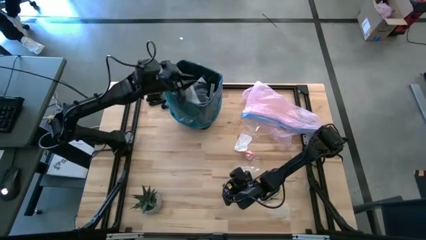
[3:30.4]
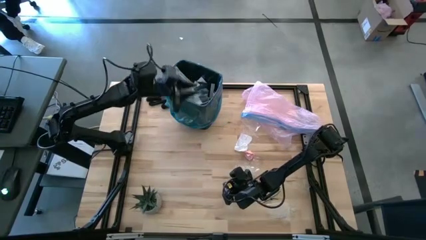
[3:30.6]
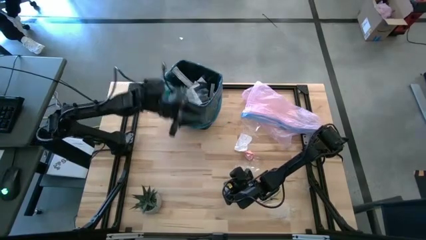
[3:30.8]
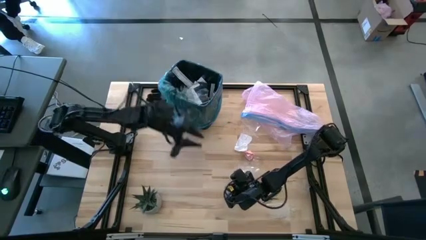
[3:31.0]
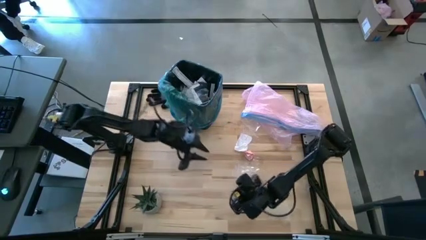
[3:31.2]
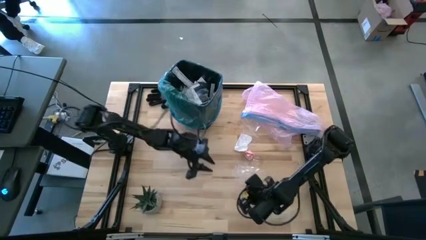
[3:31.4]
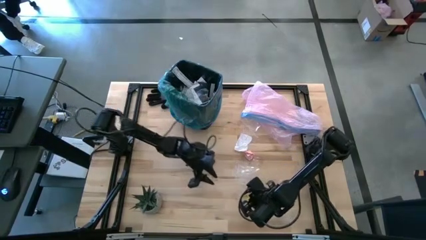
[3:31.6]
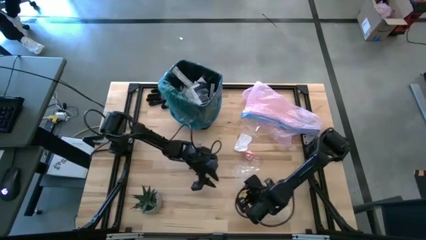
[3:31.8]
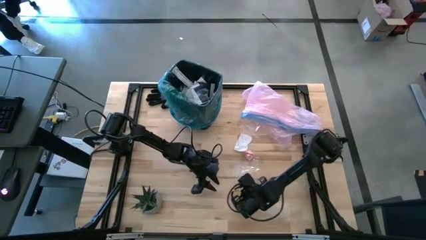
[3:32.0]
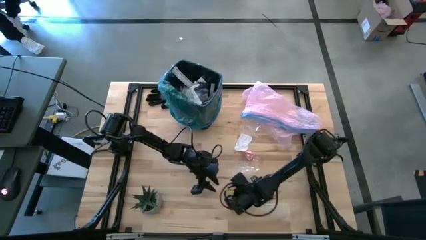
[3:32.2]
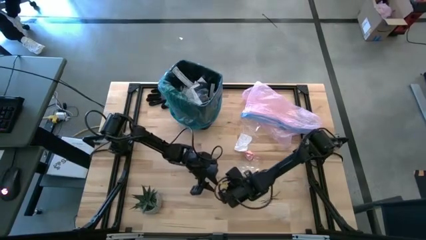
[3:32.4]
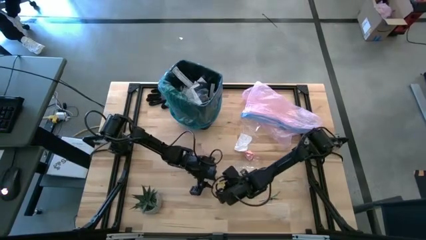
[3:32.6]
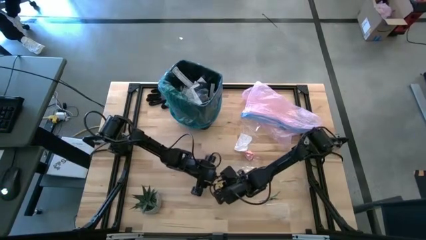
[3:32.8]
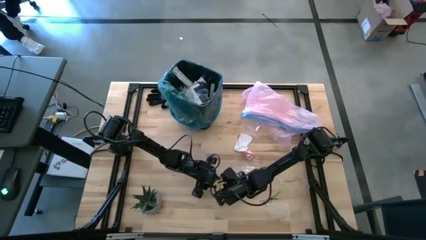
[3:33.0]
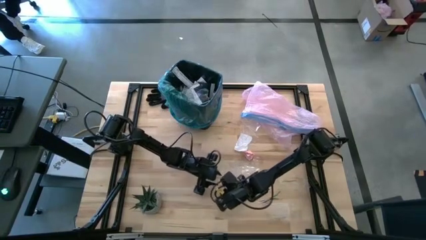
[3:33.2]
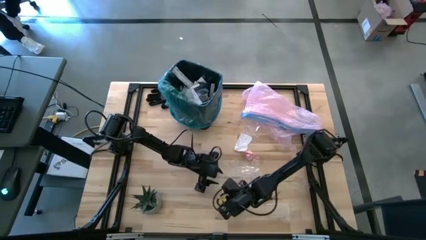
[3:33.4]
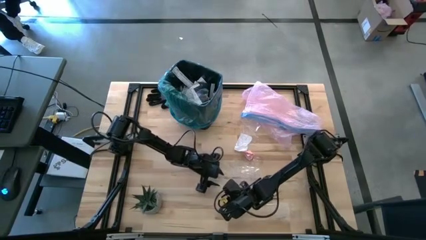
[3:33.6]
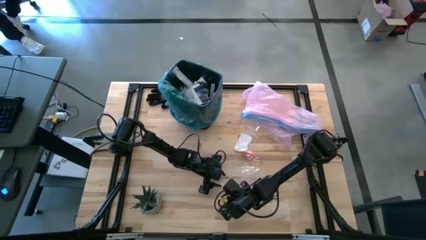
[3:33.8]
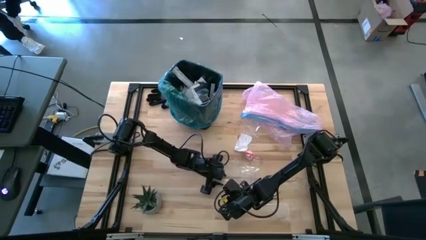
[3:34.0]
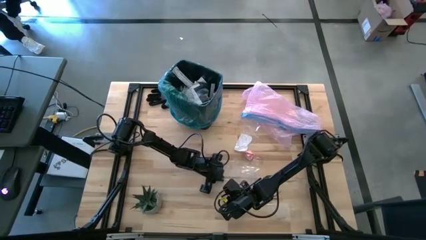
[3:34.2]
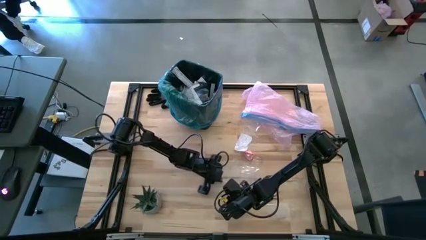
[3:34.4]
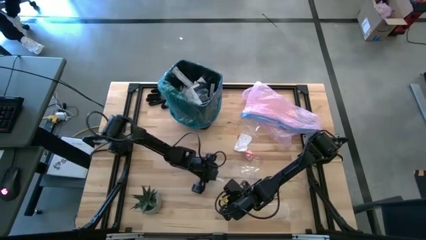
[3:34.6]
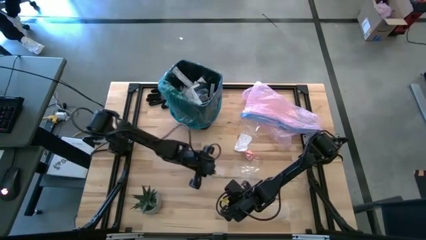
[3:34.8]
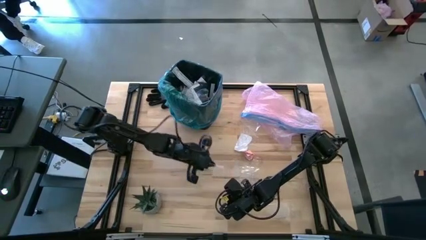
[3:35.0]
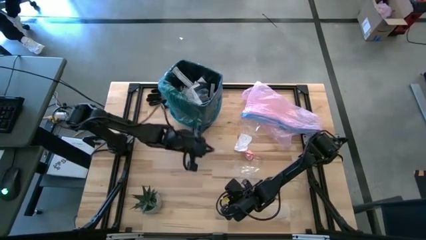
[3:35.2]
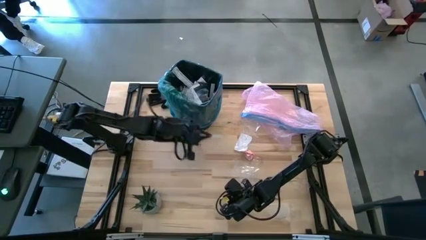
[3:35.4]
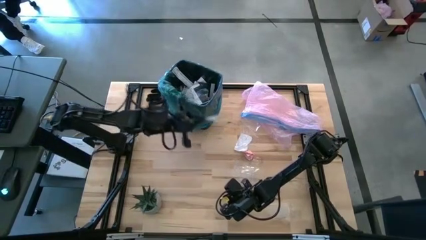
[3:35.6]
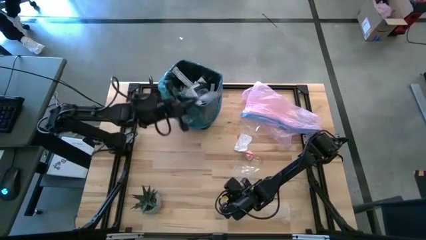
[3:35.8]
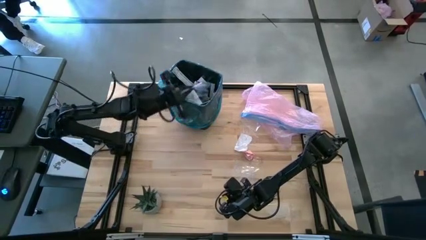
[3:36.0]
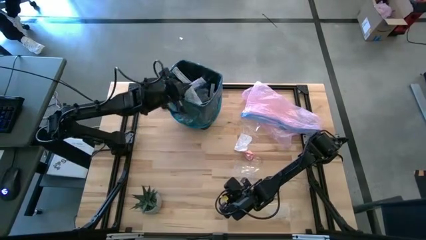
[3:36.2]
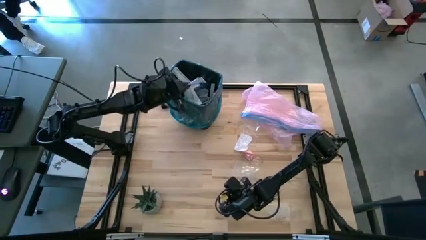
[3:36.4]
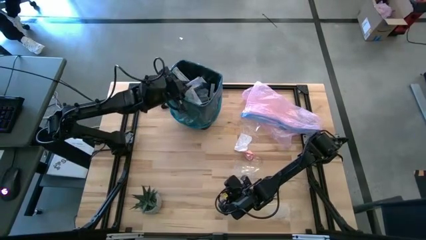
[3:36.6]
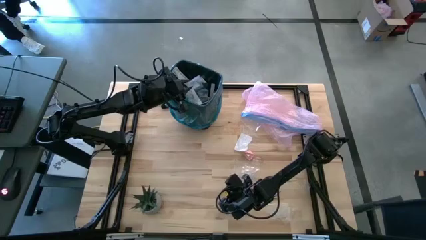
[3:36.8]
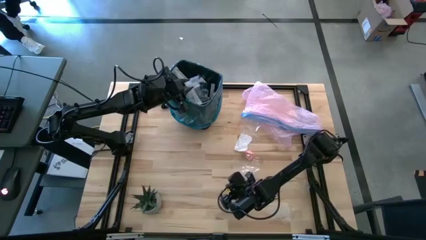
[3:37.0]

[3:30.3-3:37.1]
Task: place trash/remove bag and relplace
Put the clear plastic into the trash bin

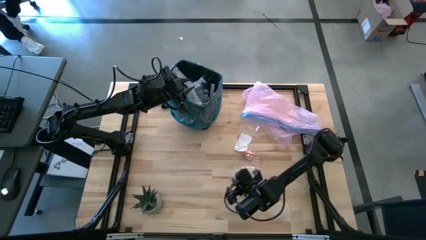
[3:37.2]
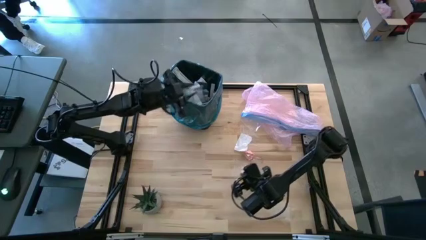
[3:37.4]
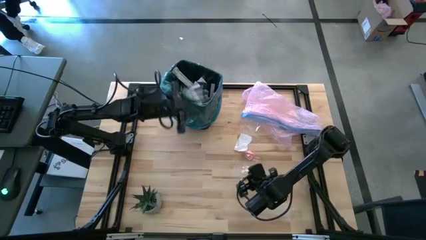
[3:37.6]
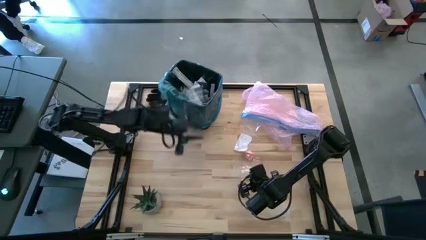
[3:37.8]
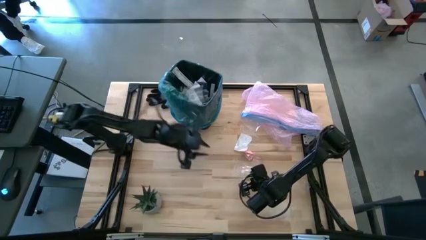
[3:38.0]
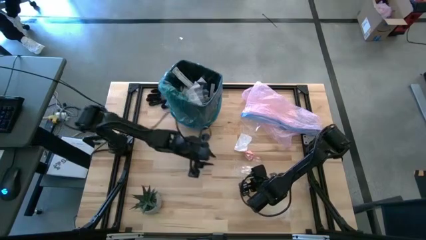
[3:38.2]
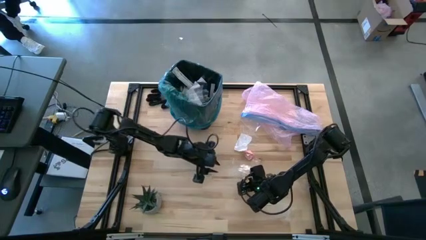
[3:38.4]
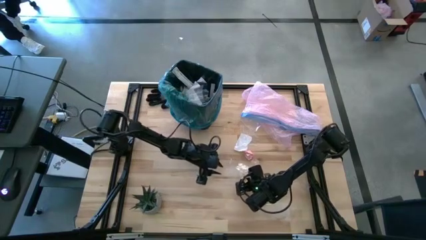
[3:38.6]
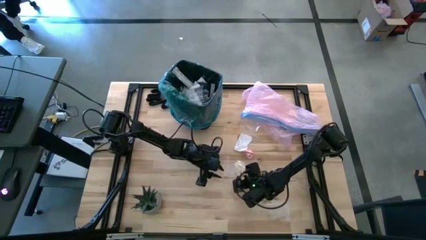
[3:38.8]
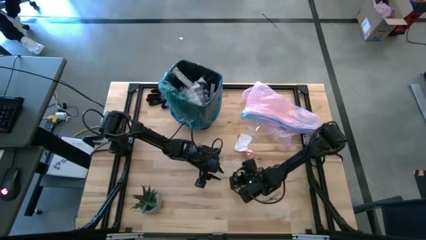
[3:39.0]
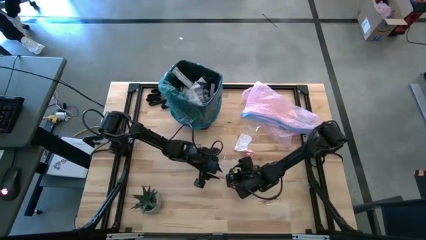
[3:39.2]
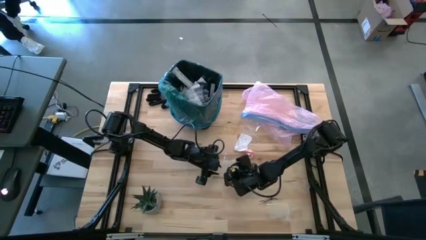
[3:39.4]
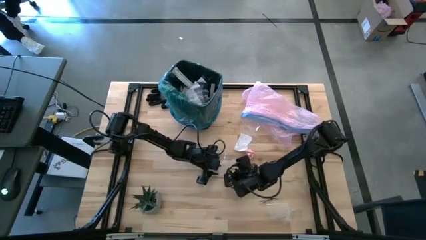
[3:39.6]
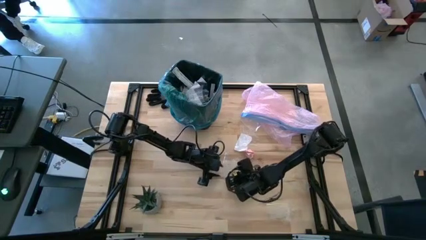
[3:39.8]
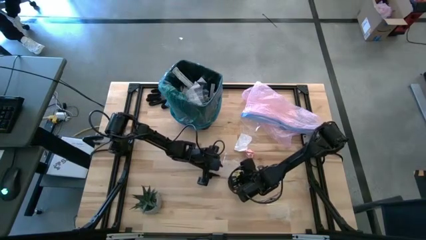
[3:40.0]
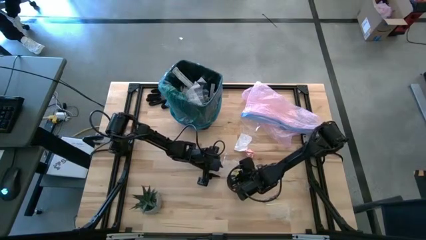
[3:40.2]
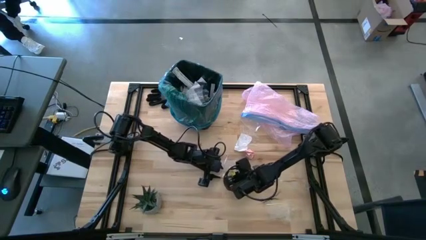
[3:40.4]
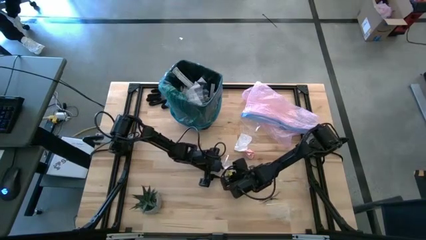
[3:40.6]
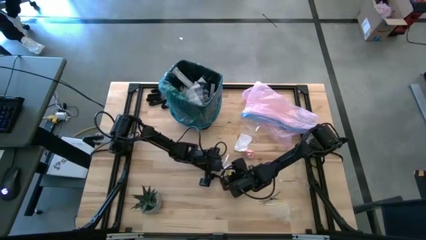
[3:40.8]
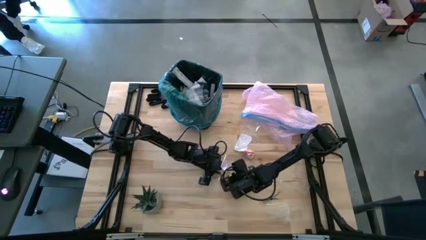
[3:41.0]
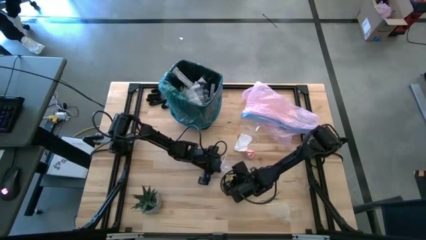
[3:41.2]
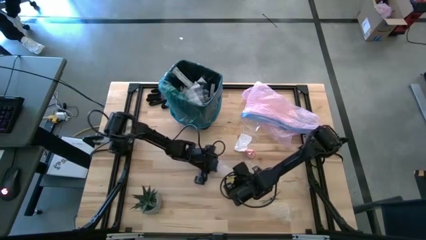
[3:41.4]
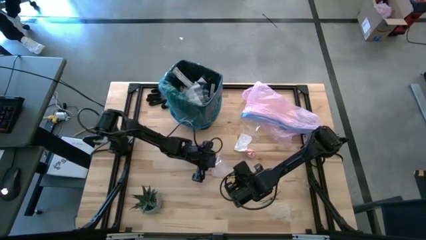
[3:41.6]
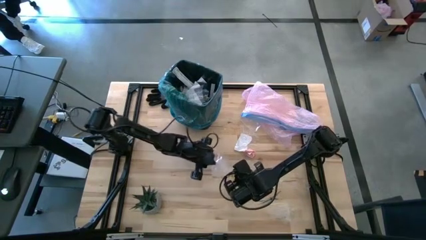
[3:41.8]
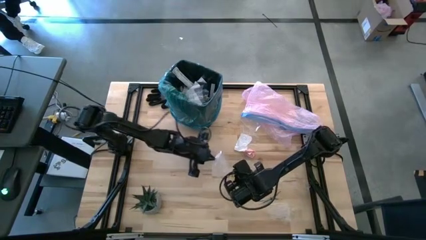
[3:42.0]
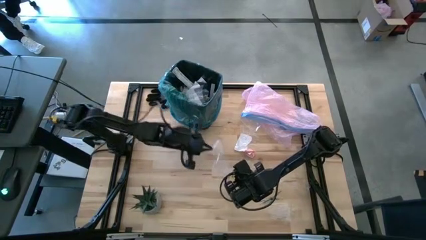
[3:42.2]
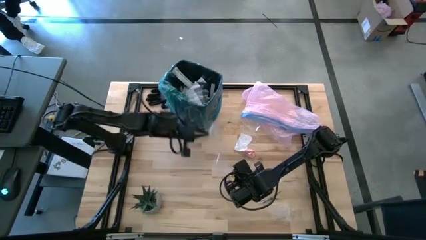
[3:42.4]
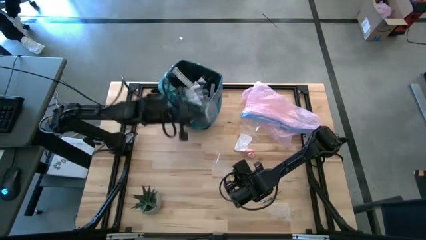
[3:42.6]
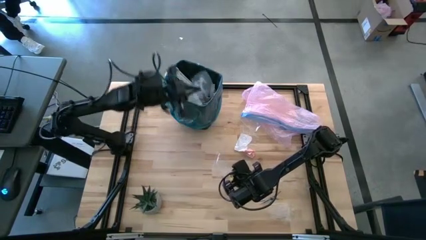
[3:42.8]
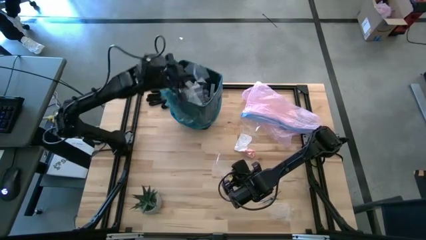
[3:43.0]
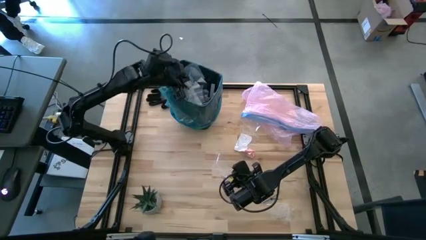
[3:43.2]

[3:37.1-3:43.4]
Put the clear plastic into the trash bin

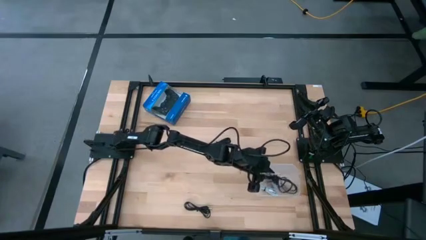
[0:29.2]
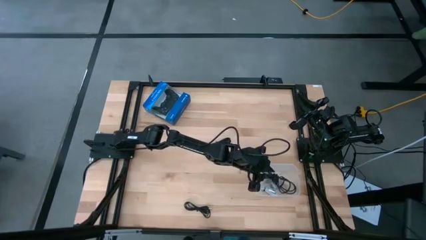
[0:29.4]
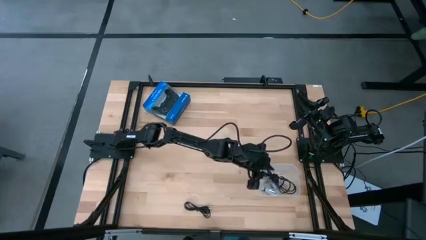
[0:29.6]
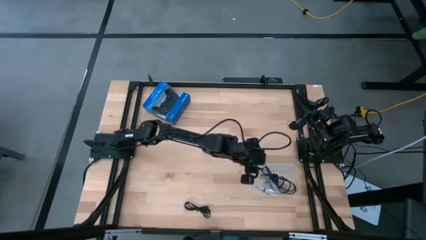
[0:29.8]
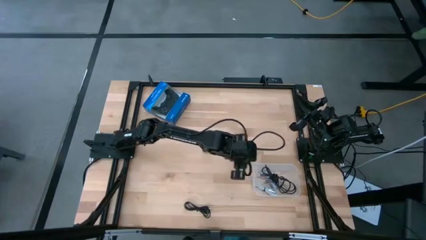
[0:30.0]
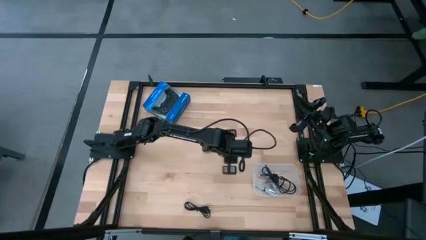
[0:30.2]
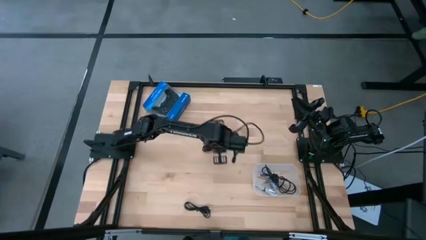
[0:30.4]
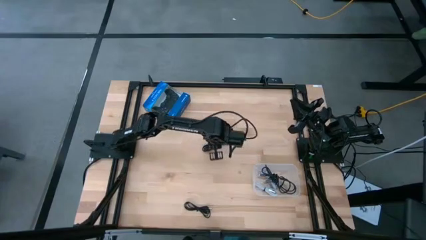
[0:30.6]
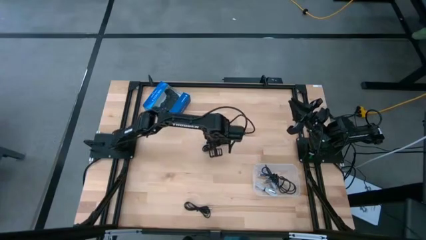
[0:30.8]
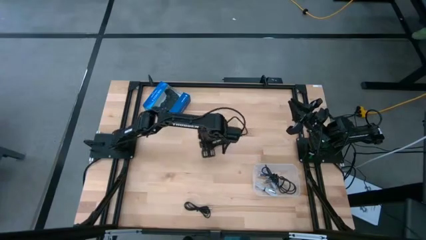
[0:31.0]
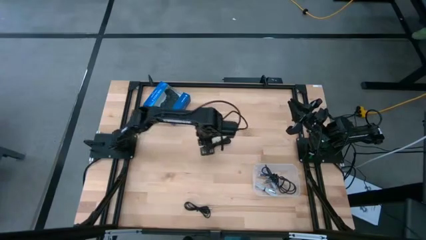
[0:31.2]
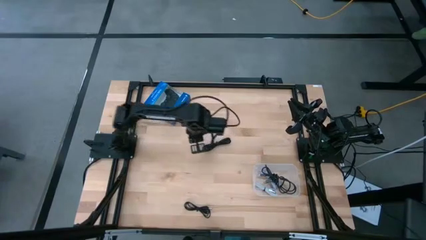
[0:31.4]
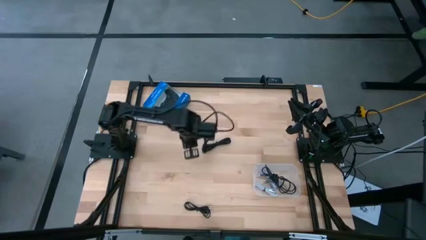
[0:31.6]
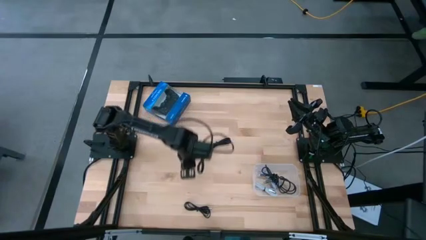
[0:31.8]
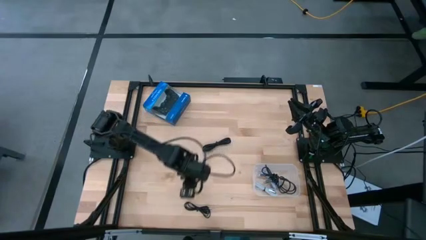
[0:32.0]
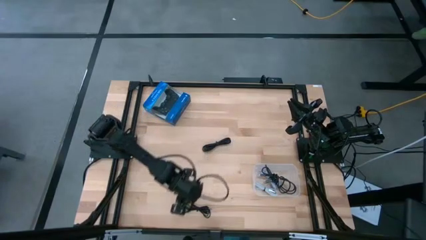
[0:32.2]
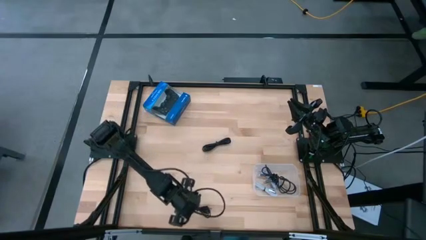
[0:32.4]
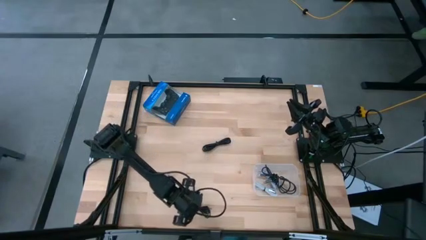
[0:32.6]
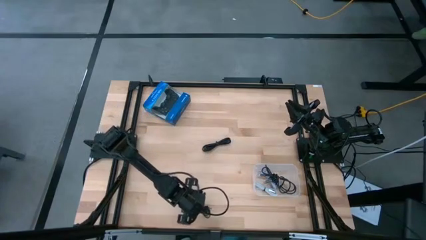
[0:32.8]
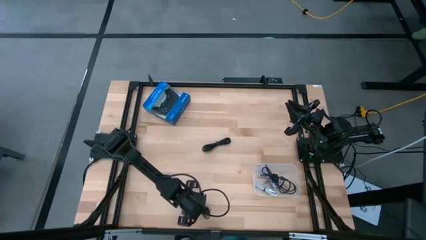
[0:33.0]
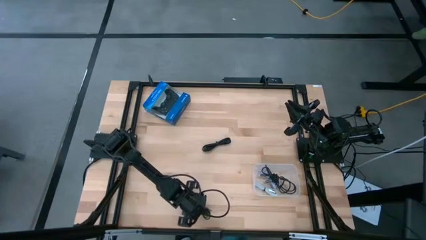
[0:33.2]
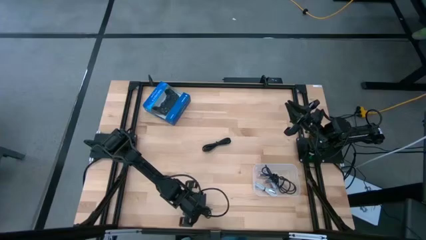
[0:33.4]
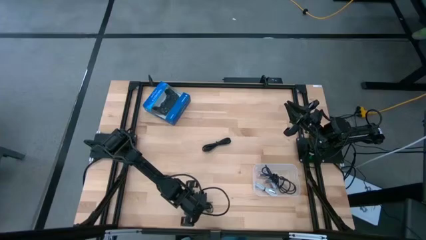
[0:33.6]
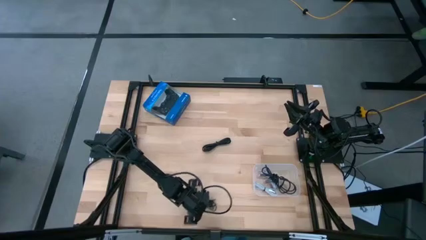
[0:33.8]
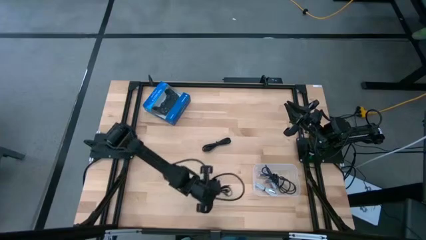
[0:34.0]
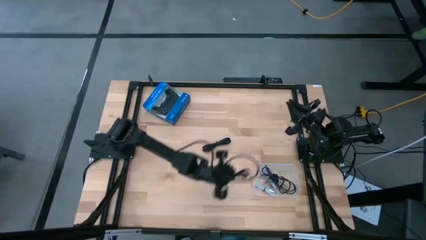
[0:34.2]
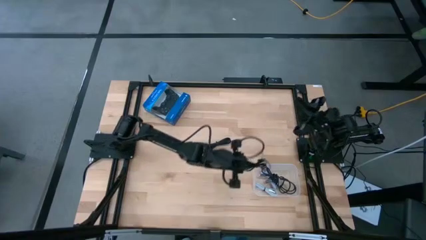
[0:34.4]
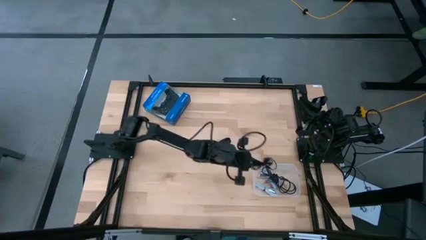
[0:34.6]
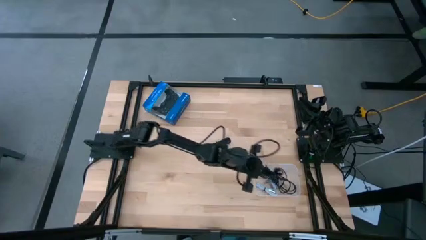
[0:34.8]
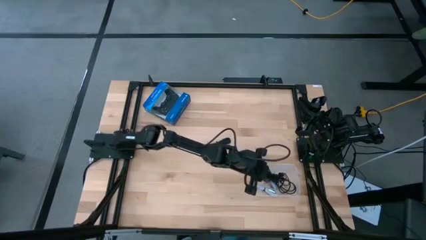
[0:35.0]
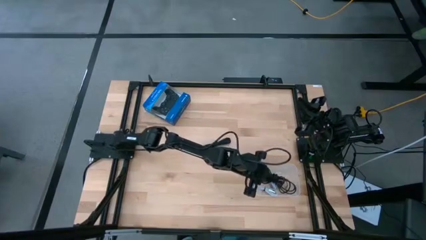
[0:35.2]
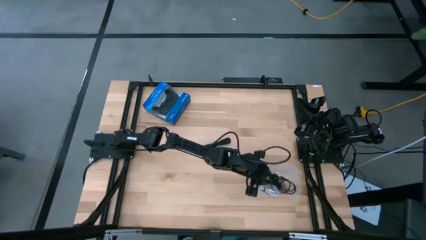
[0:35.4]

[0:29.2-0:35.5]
Task: Pick and place USB-C Cables
Put the bottom black charger cable into the transparent container
